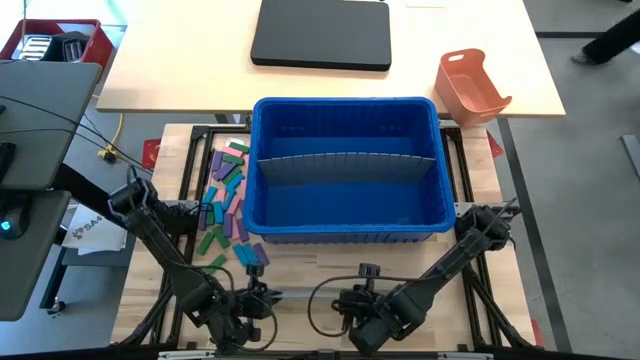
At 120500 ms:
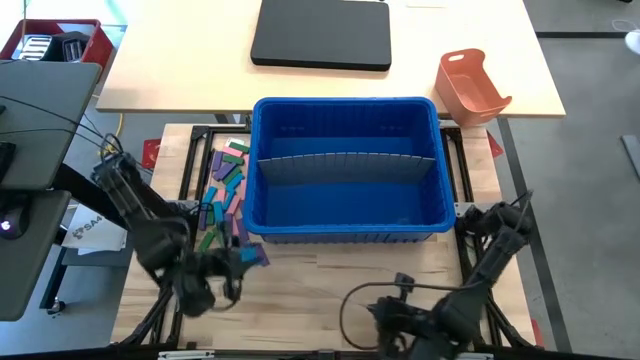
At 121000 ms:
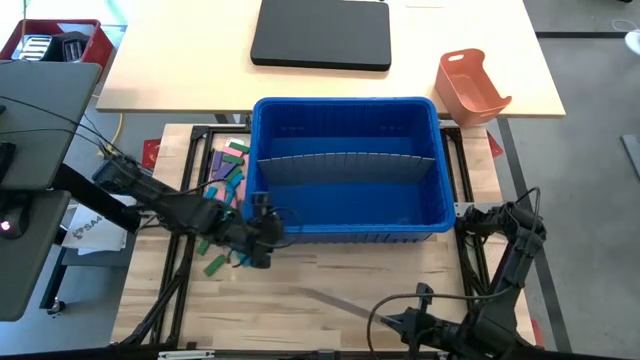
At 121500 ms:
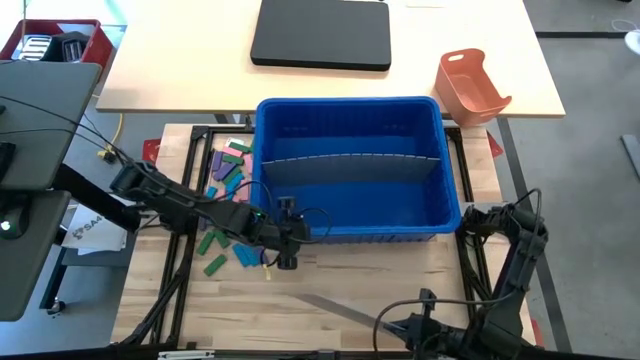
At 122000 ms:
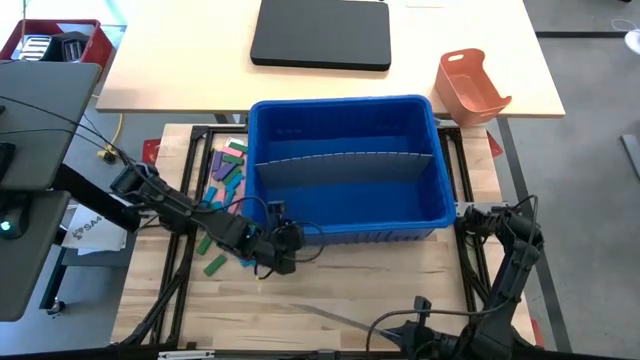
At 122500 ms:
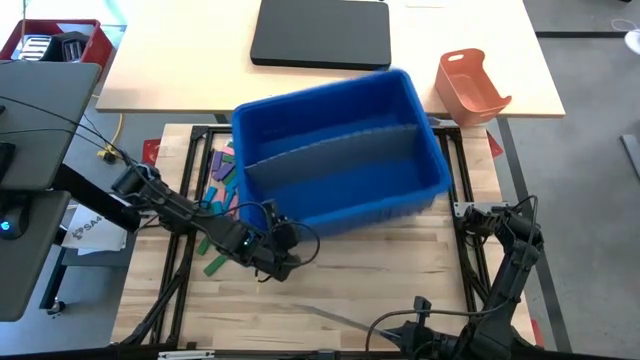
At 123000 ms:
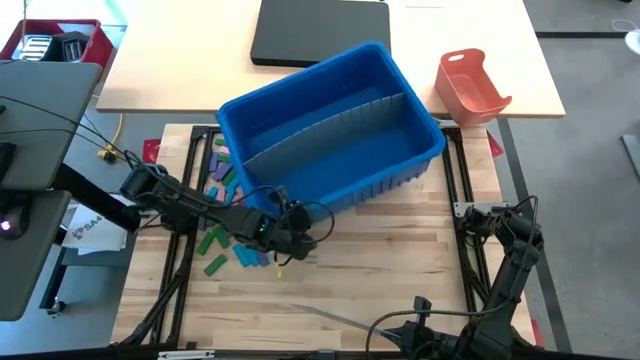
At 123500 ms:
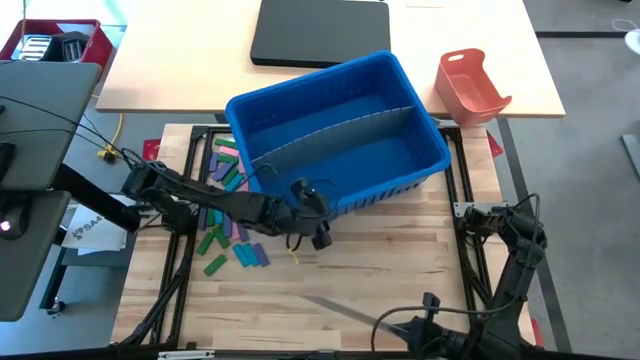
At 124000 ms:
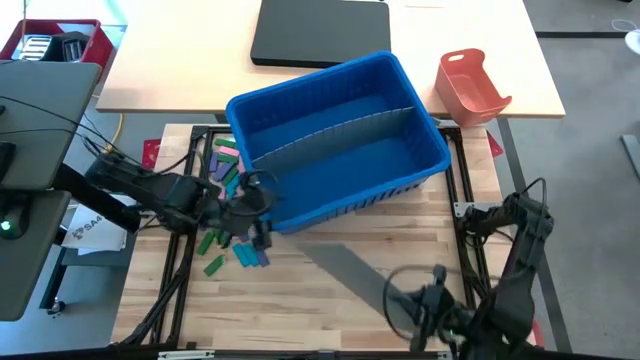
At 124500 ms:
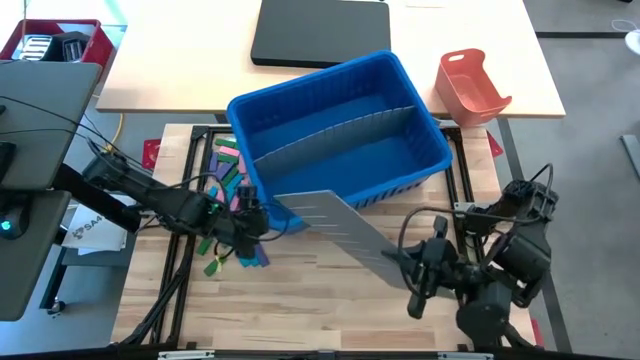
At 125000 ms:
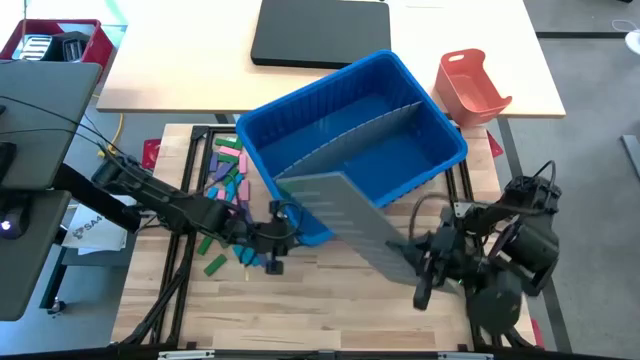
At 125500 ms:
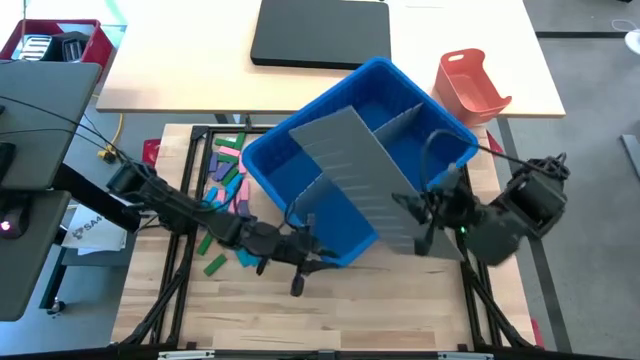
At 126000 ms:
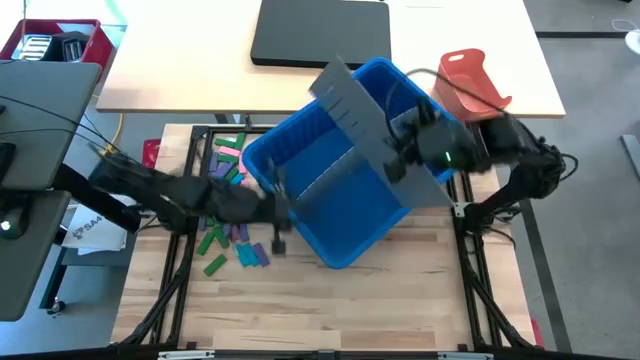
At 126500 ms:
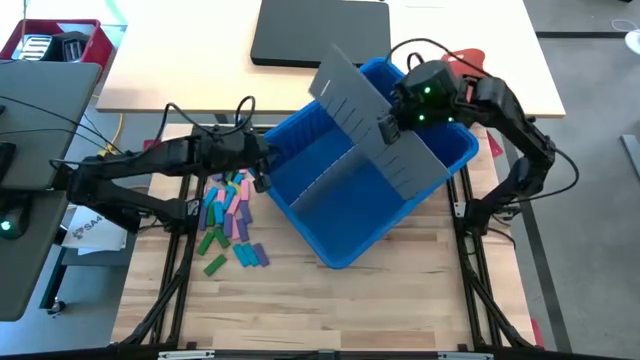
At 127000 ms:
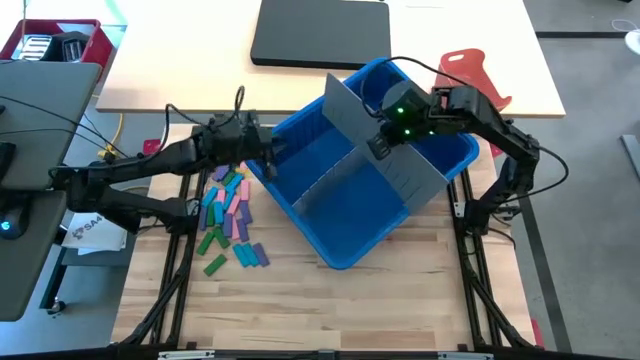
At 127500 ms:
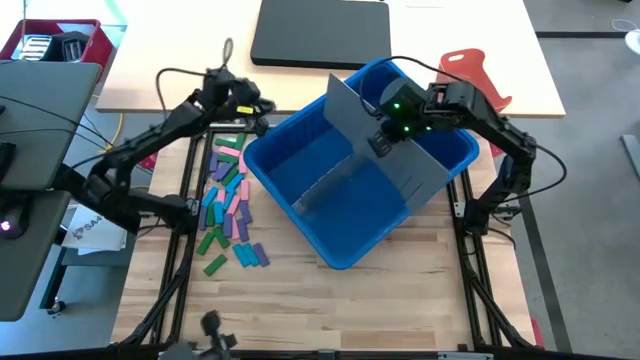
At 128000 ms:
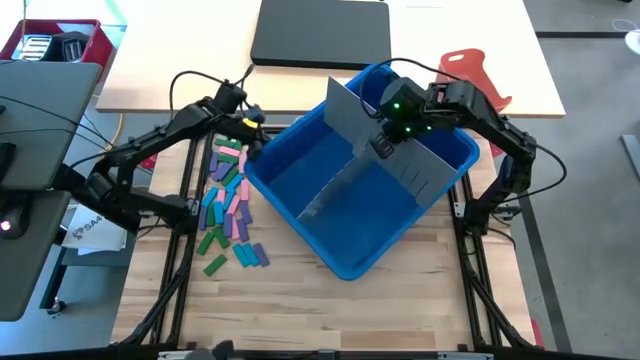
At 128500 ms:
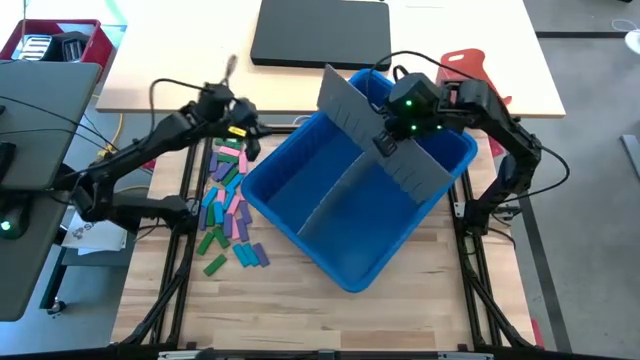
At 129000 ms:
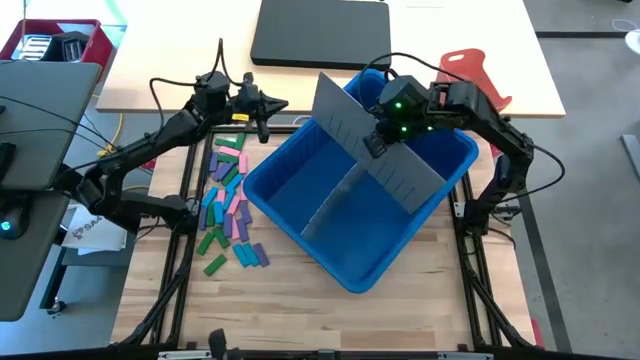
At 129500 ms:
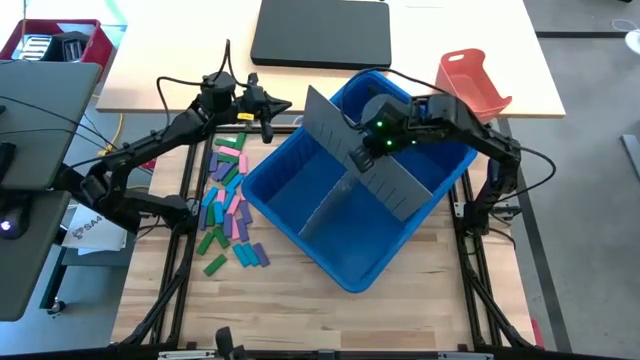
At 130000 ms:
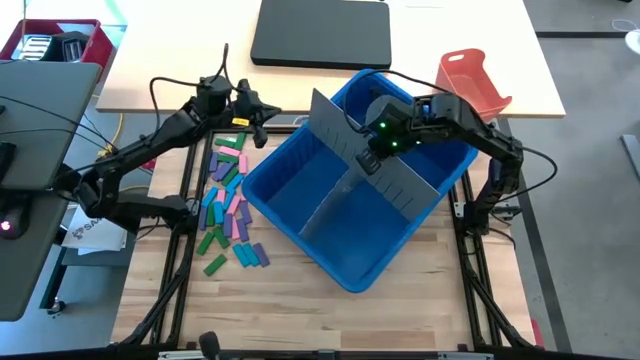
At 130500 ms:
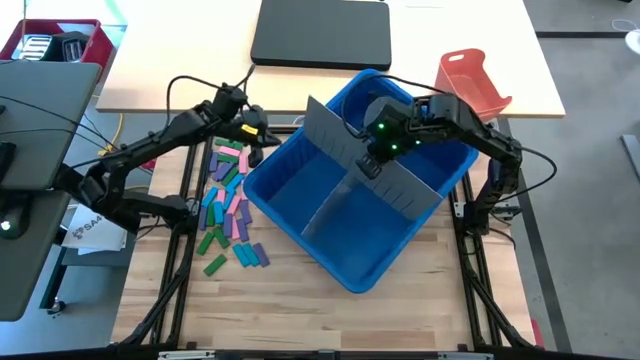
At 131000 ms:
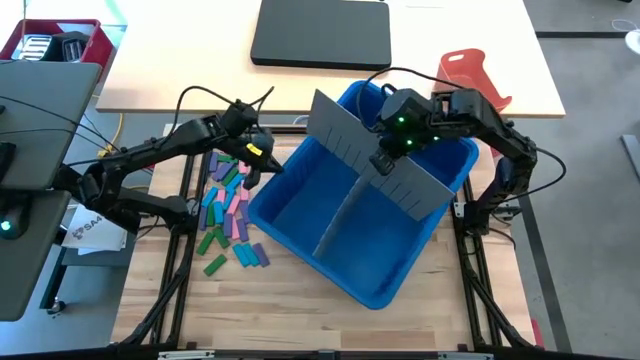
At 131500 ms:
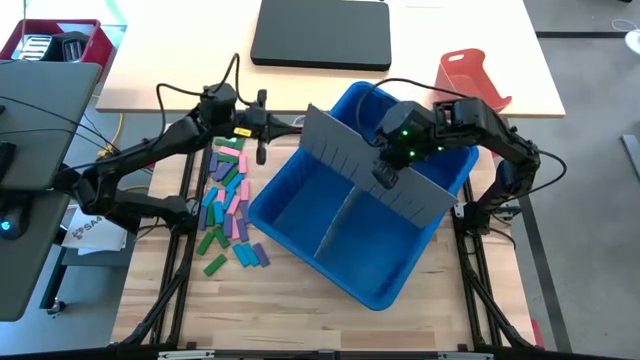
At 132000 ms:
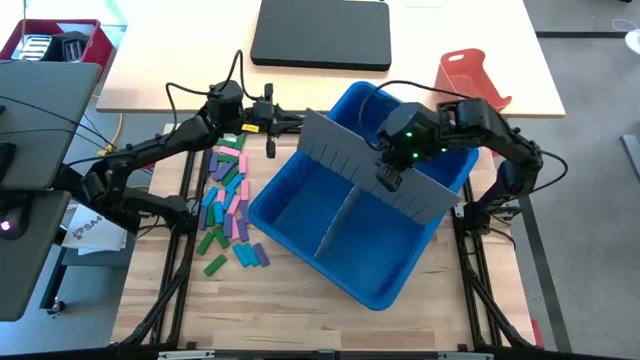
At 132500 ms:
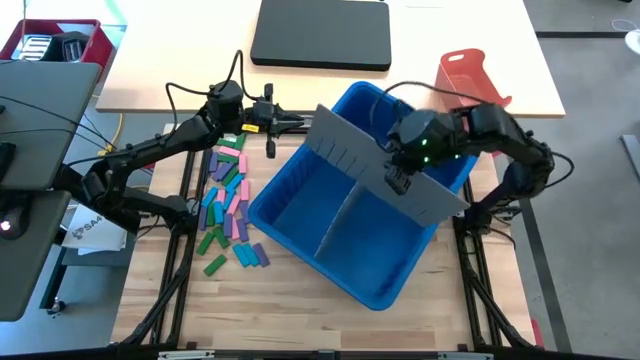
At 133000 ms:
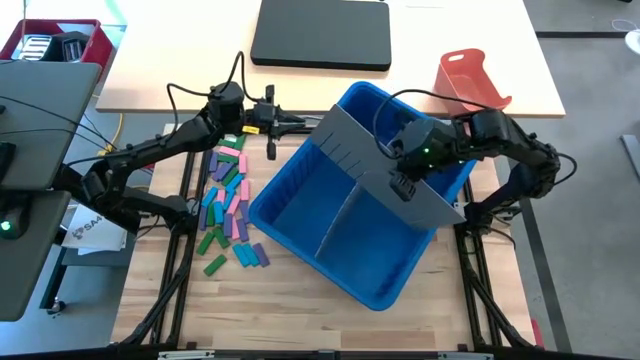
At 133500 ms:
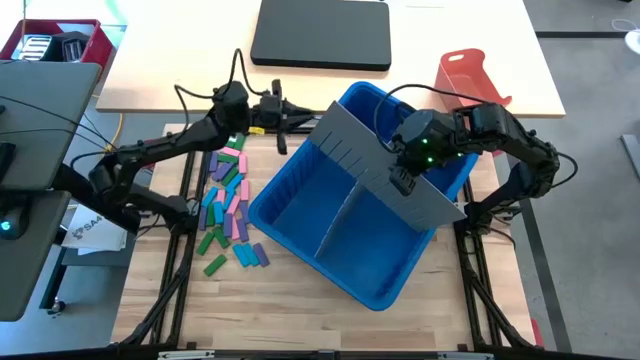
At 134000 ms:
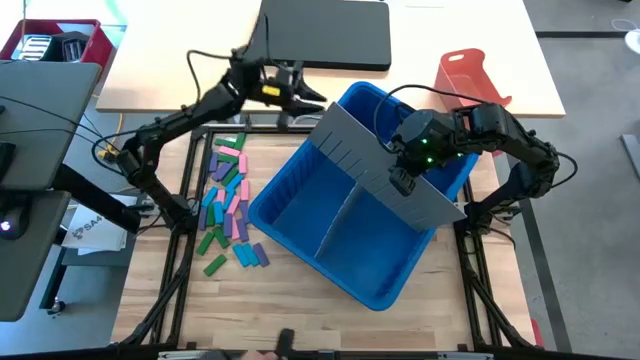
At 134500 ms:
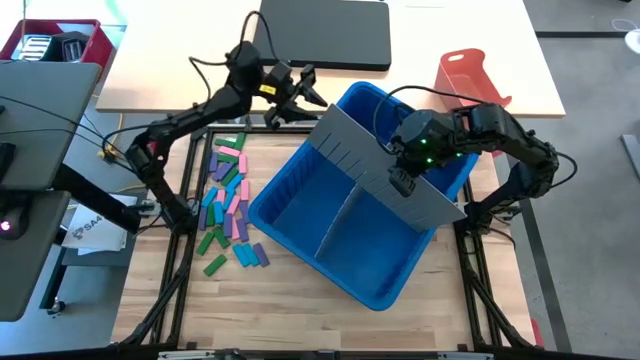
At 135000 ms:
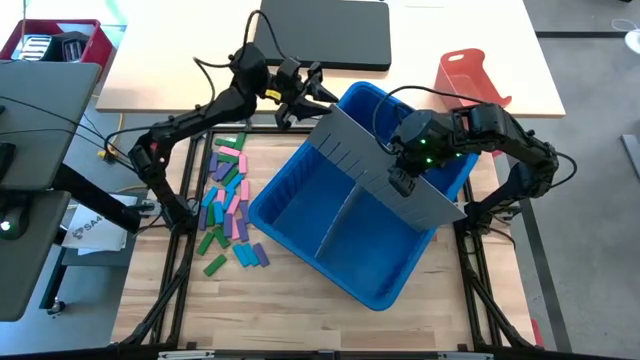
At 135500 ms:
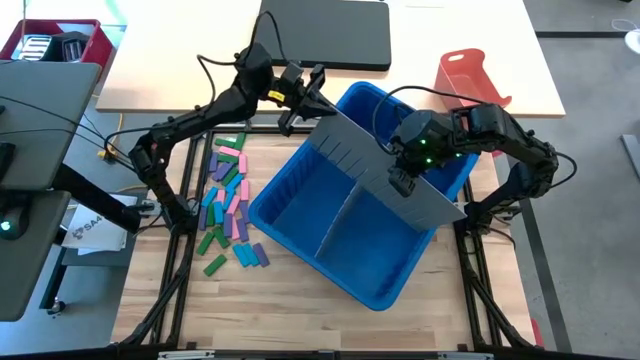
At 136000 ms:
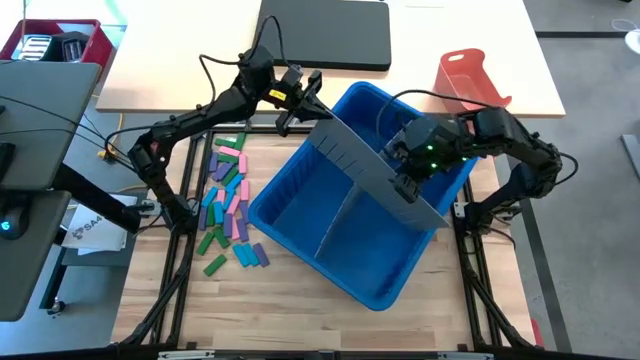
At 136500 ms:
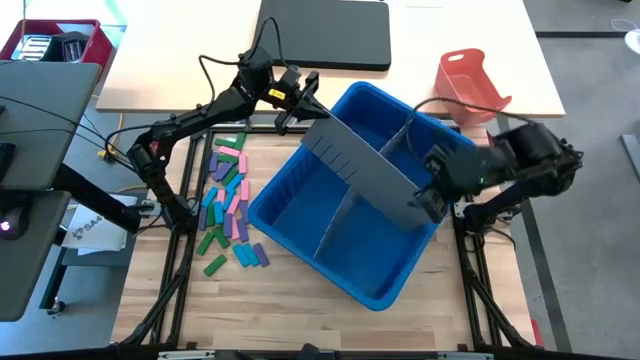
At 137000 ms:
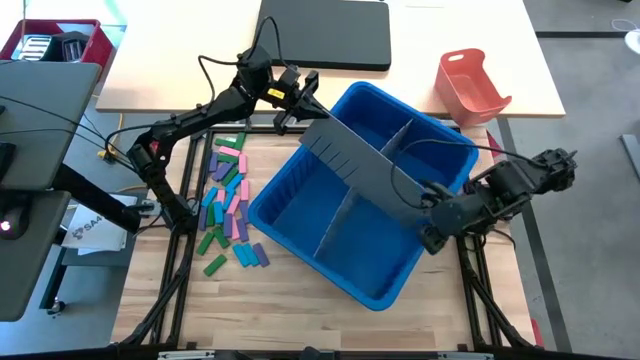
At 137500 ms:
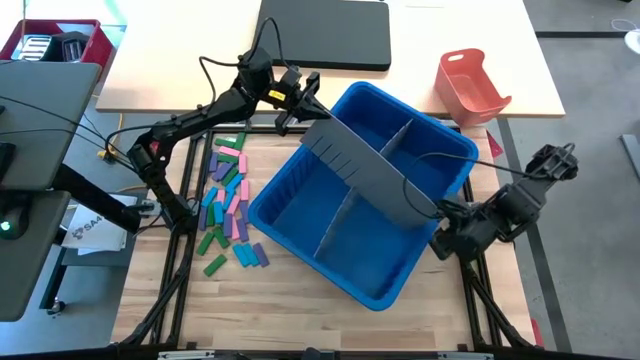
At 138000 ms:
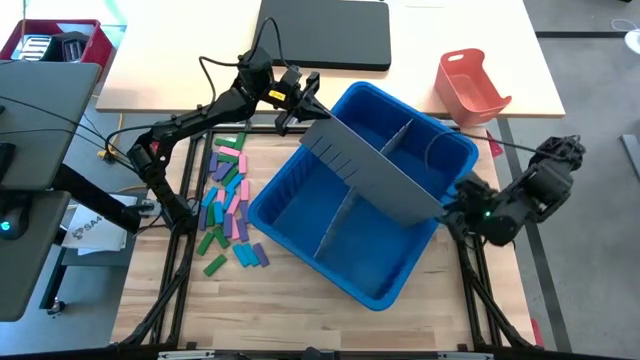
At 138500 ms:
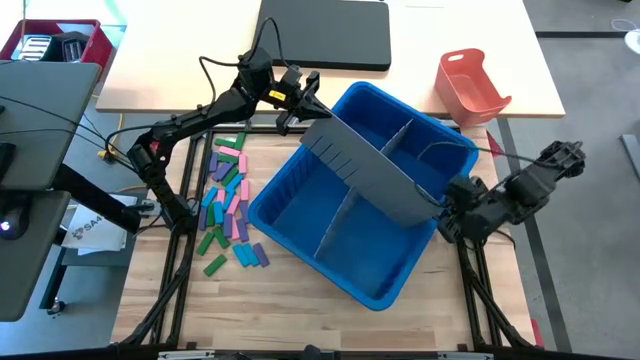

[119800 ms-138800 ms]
Task: Sort blocks
Insert the bin divider into the blue bin

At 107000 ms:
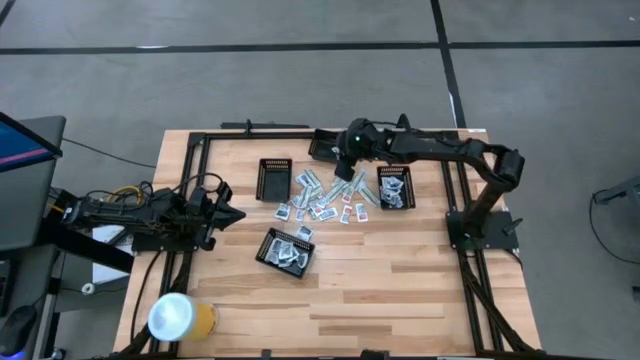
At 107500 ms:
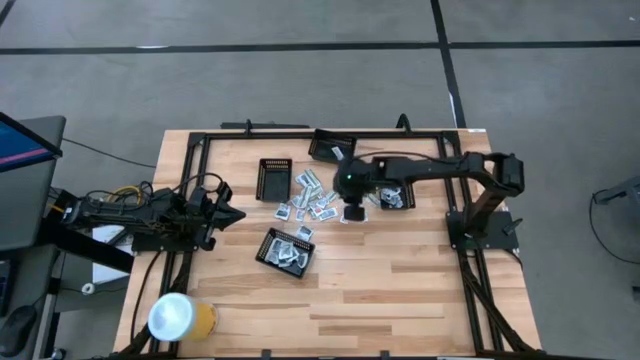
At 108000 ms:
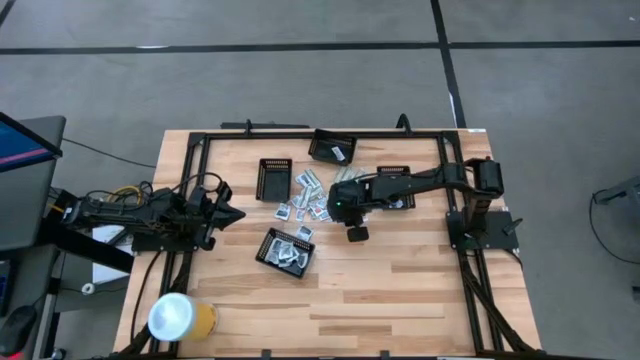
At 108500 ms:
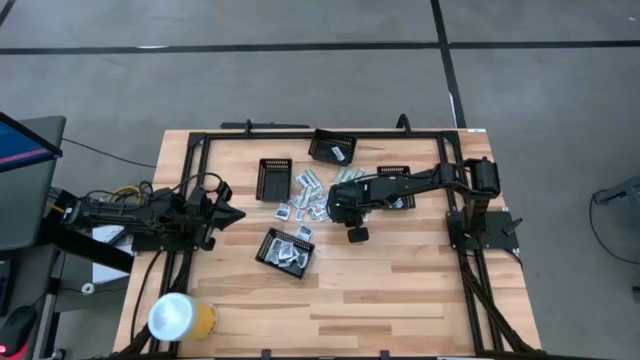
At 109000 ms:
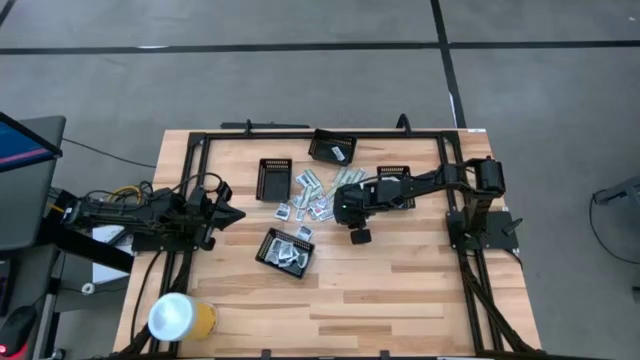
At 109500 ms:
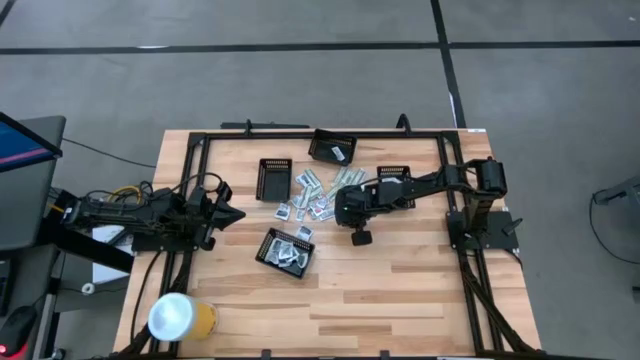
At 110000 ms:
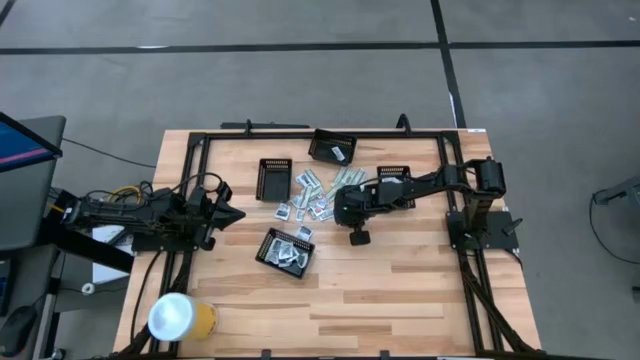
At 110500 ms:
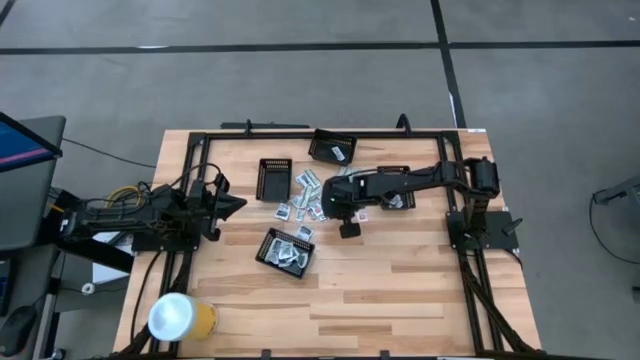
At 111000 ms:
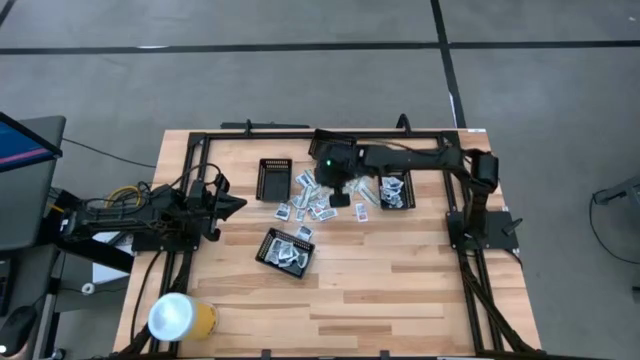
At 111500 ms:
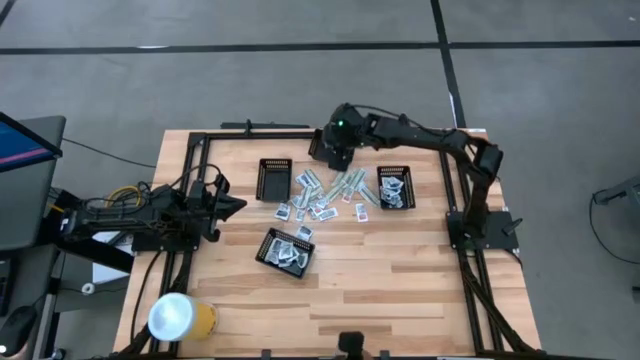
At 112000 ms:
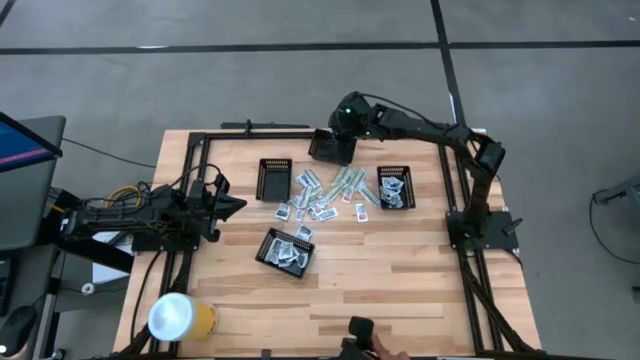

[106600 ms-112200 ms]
Task: Pick & Place First Aid Supplies
Put the orange ointment pack into the top black bin
